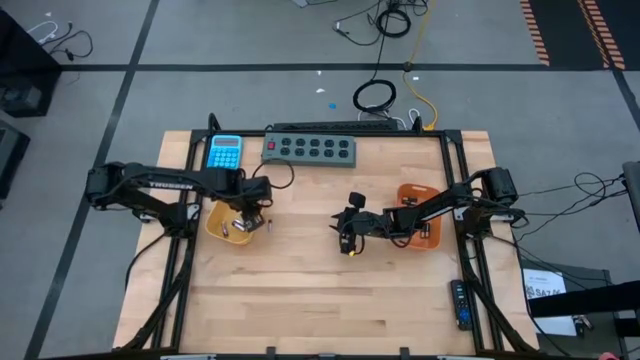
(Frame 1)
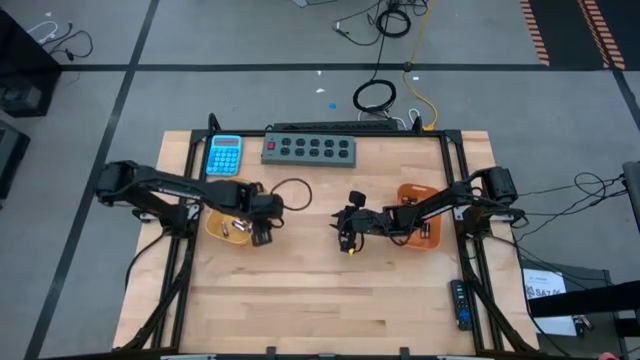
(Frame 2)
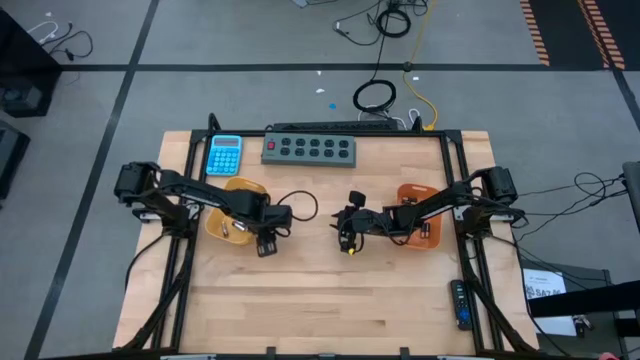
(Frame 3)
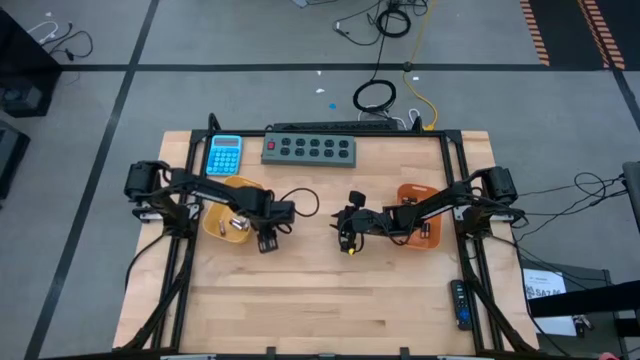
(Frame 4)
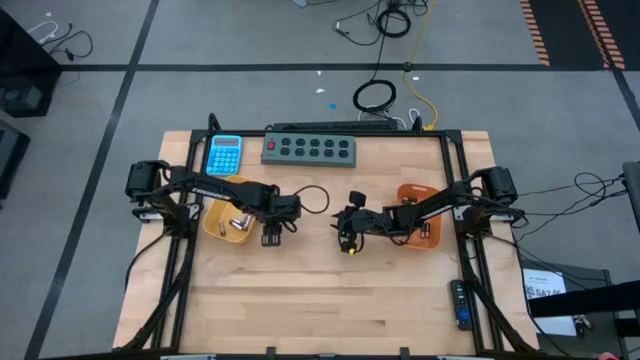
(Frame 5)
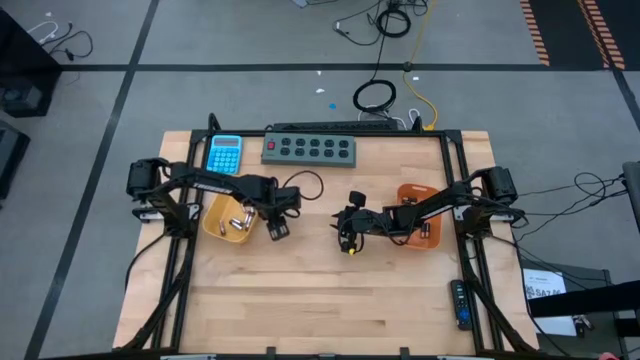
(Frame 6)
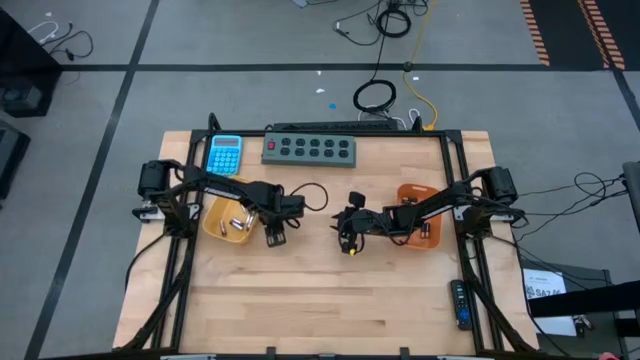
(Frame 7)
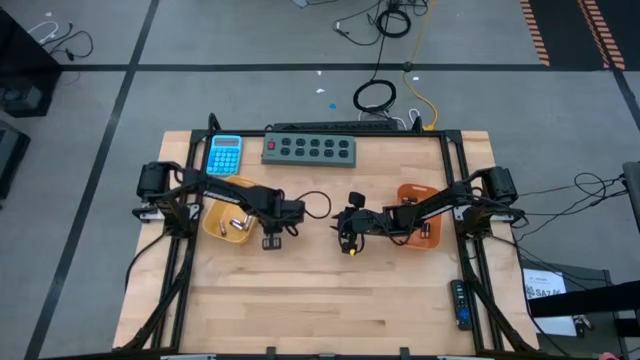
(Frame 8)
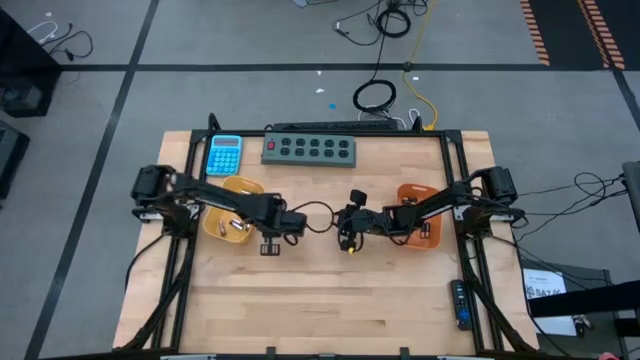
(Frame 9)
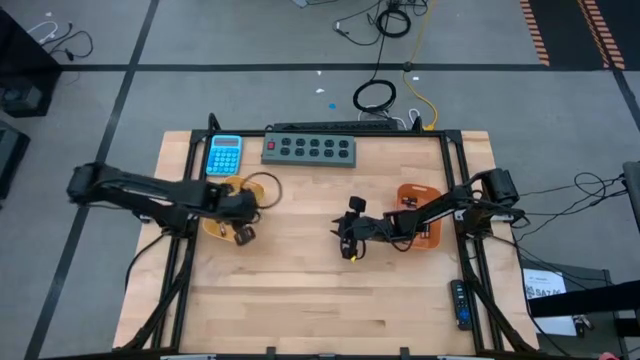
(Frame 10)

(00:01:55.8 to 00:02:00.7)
Task: Sort batteries
Put the white battery into the yellow bin

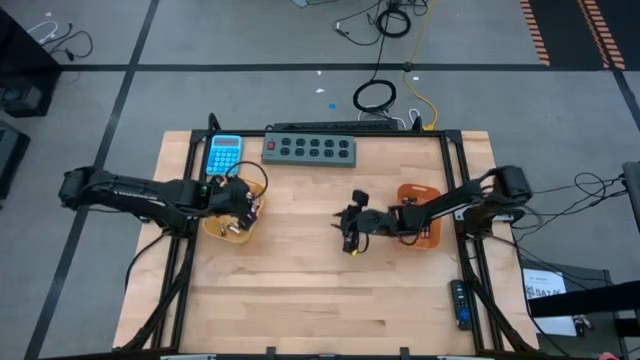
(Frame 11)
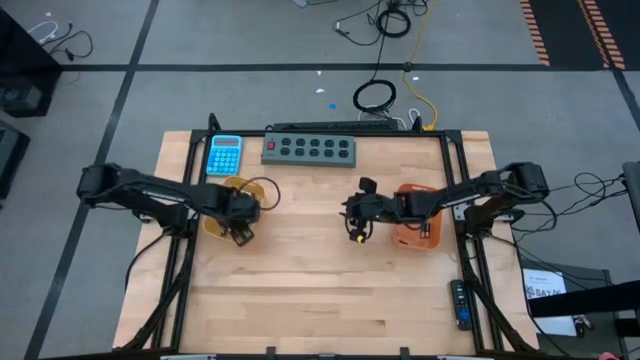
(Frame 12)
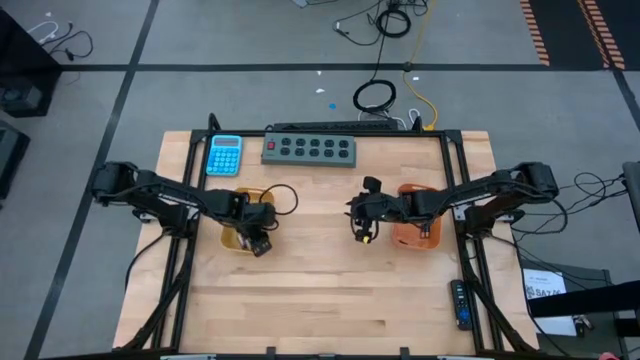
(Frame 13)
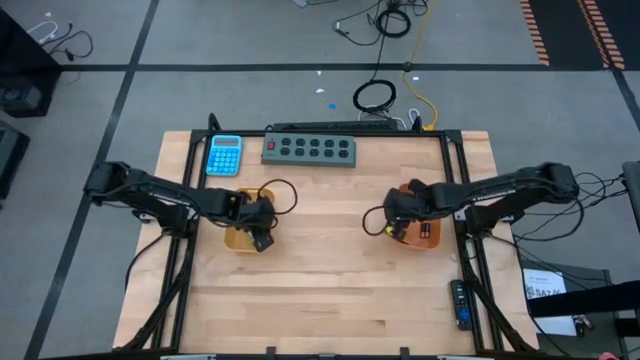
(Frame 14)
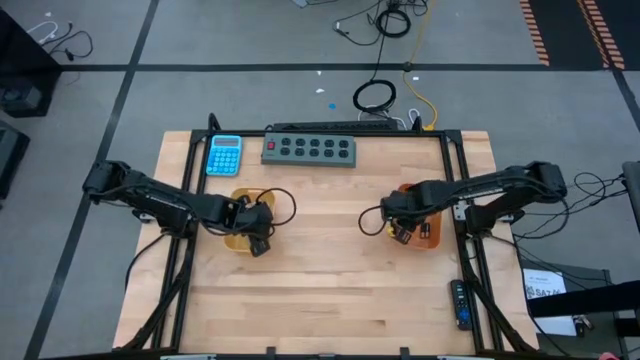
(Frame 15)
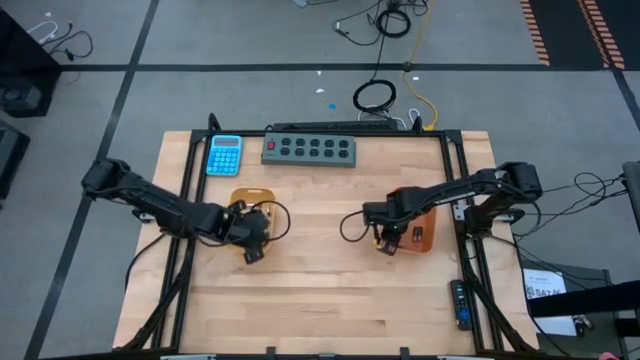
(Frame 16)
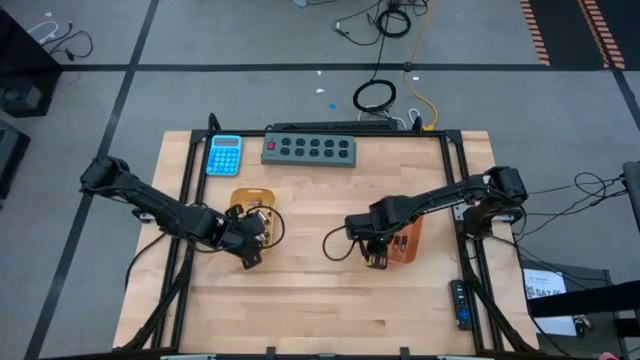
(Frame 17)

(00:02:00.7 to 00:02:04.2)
Adjust the yellow and orange bins to the center

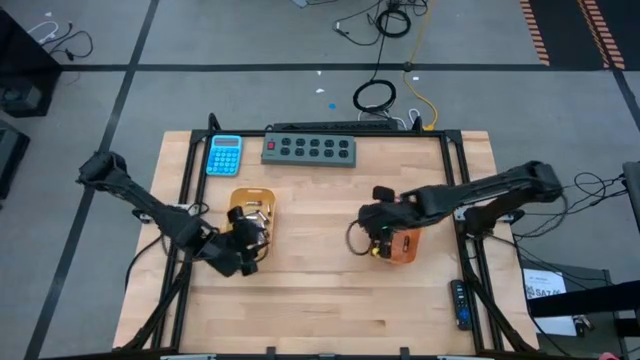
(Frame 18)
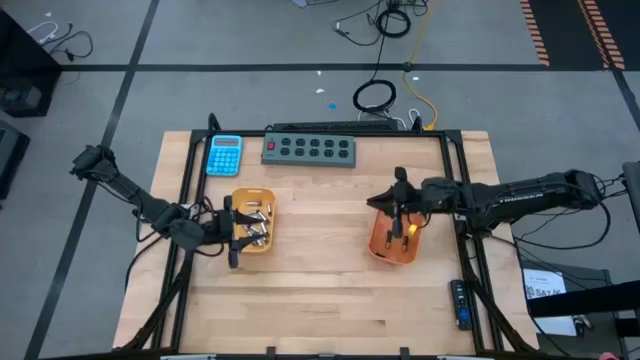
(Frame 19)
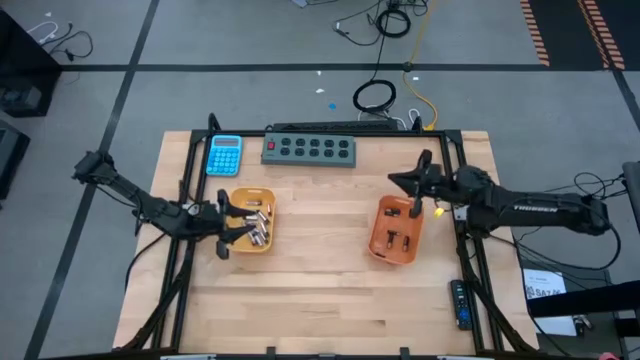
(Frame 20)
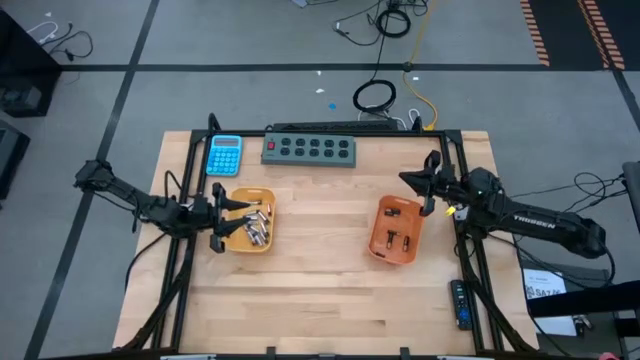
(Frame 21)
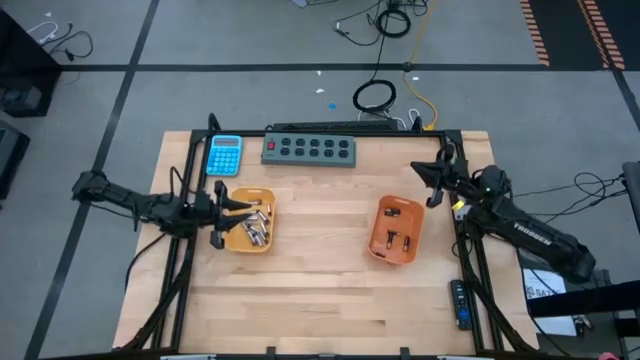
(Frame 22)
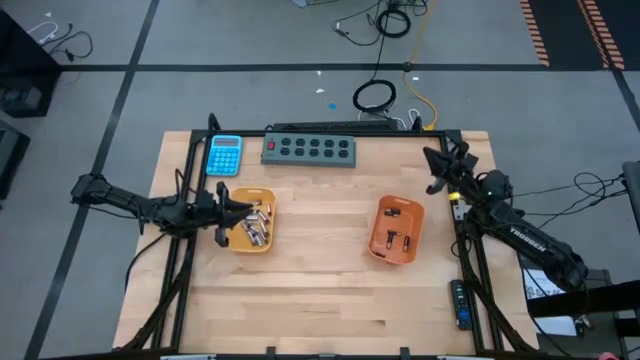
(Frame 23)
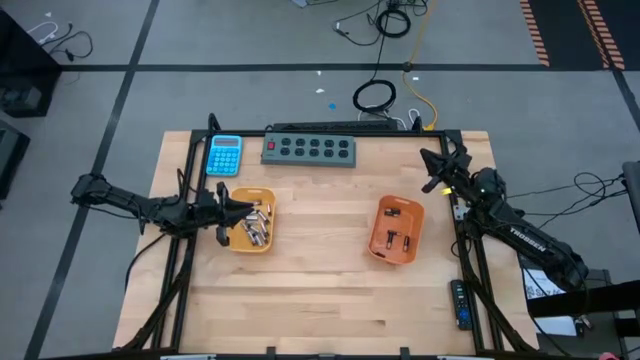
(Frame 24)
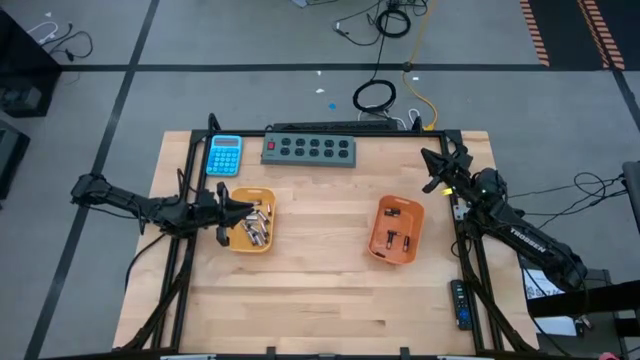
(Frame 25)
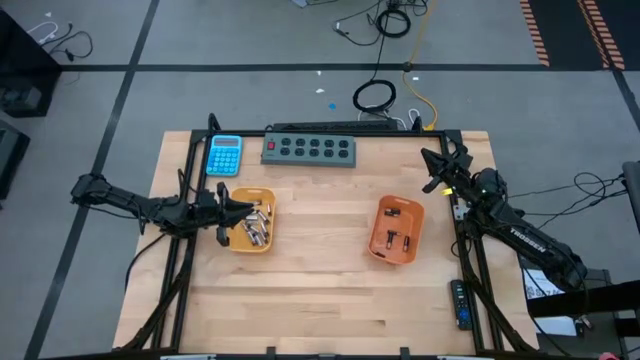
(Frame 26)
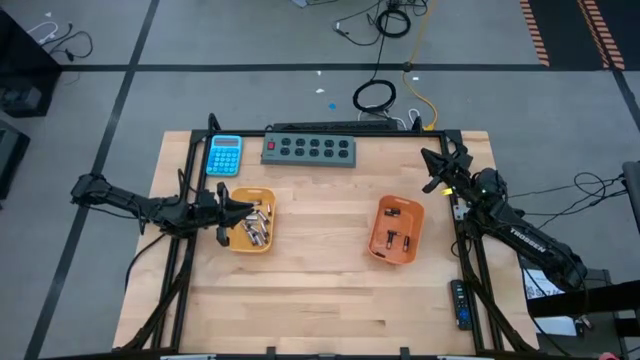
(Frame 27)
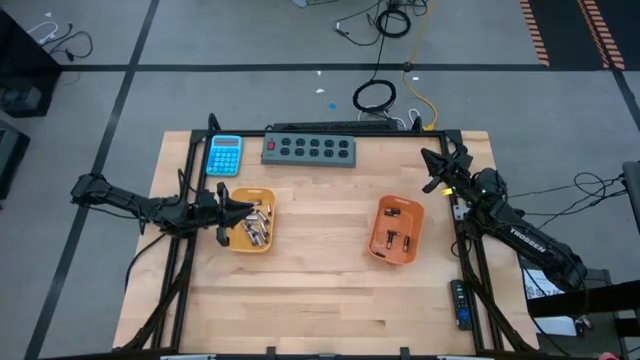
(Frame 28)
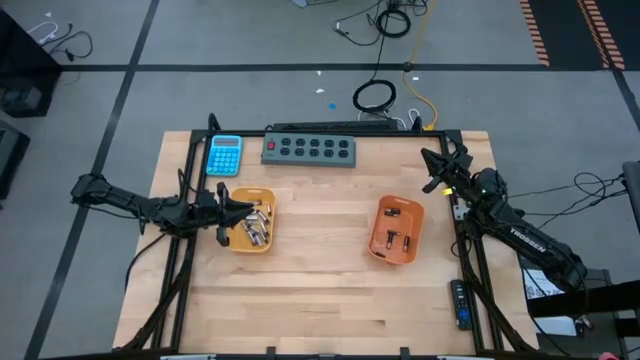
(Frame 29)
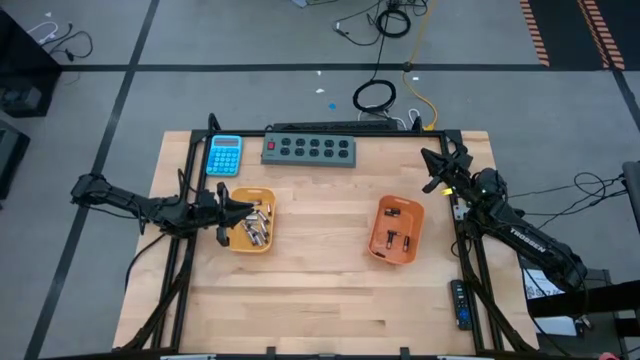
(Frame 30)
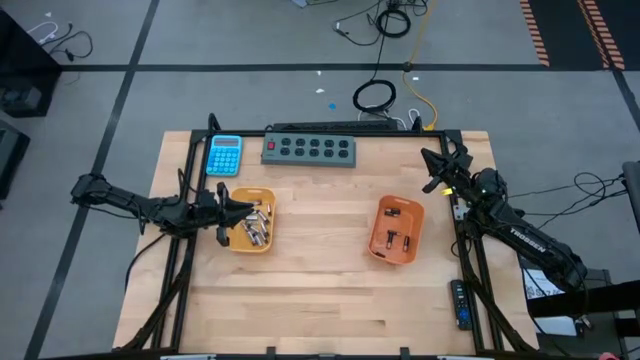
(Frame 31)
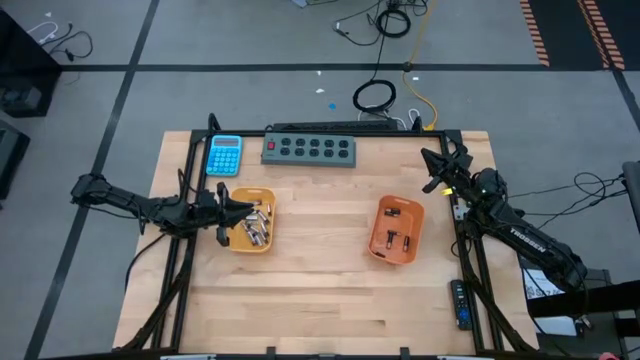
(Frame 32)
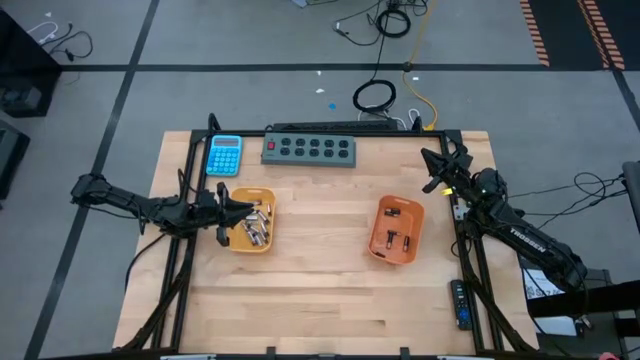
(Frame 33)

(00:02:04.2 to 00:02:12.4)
Return to Home Position

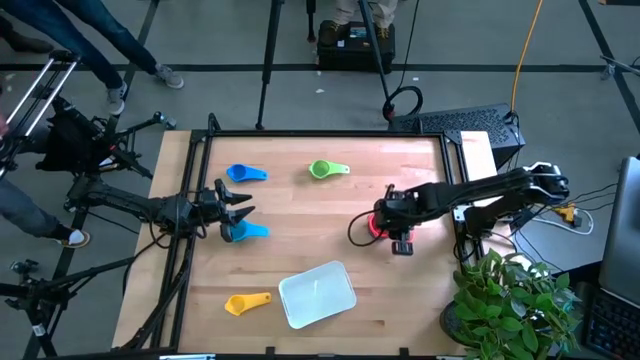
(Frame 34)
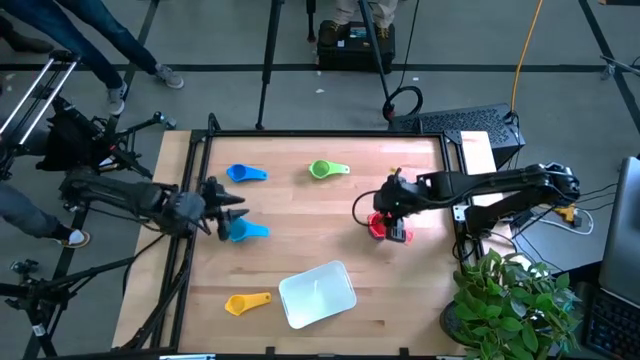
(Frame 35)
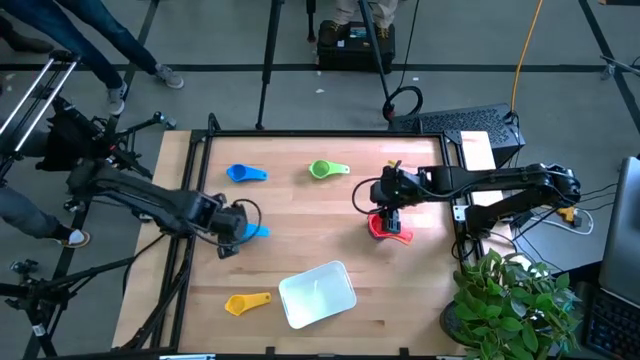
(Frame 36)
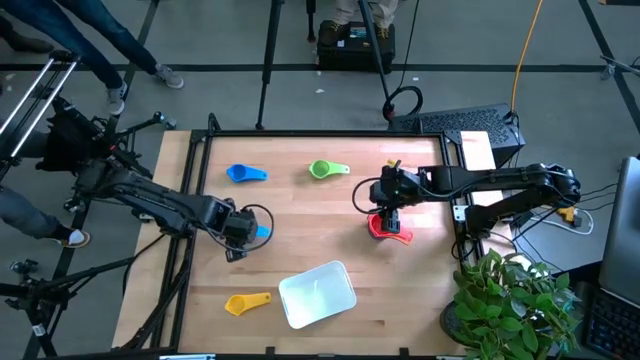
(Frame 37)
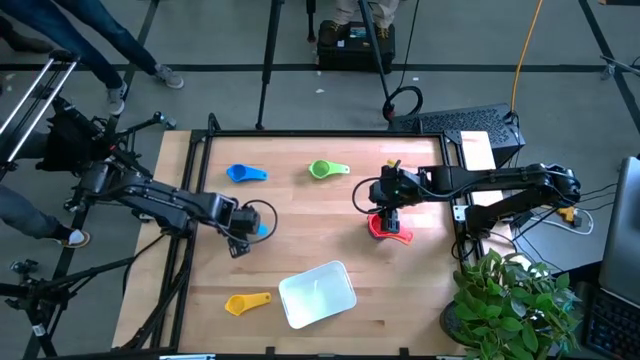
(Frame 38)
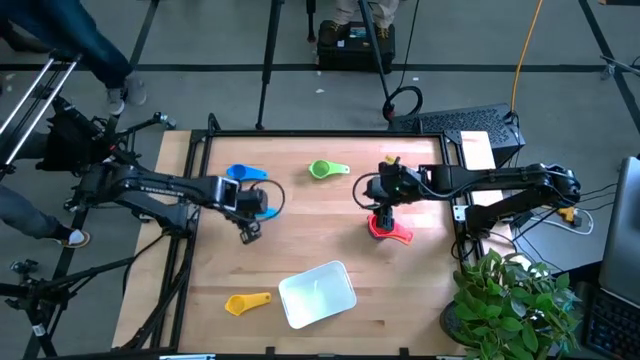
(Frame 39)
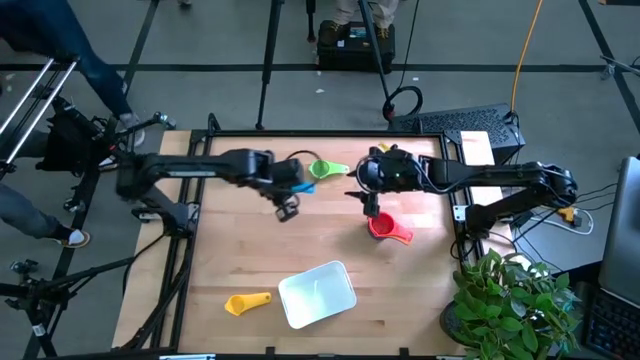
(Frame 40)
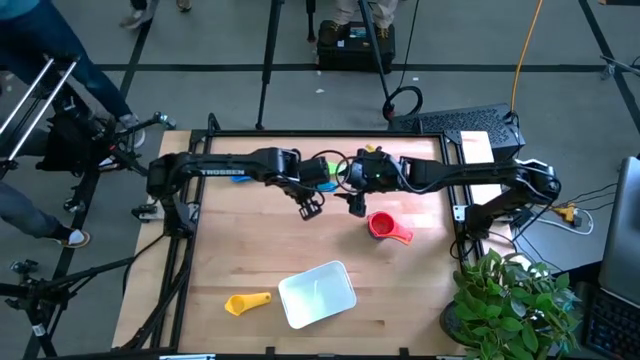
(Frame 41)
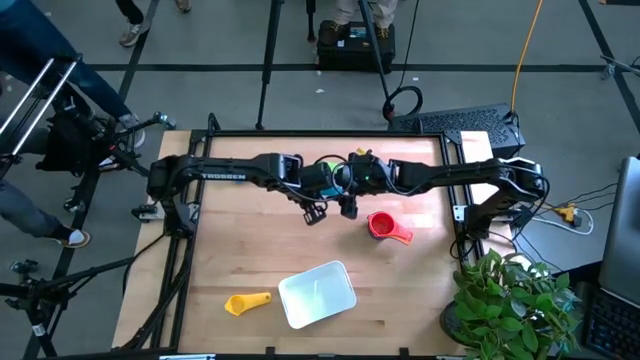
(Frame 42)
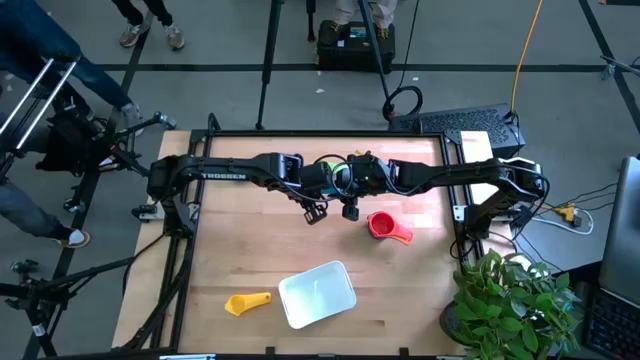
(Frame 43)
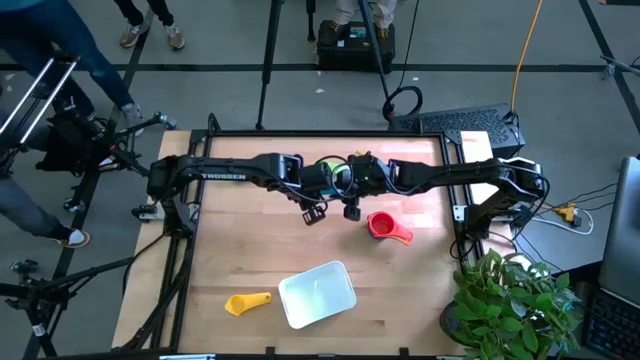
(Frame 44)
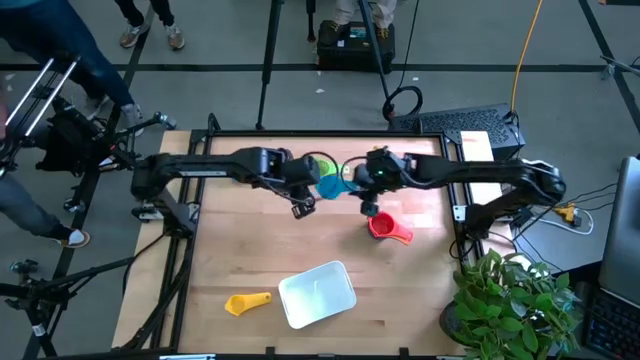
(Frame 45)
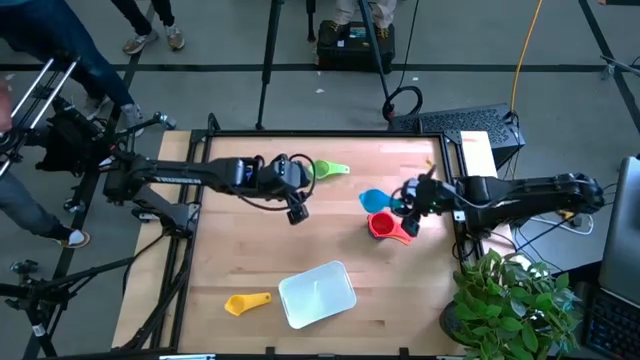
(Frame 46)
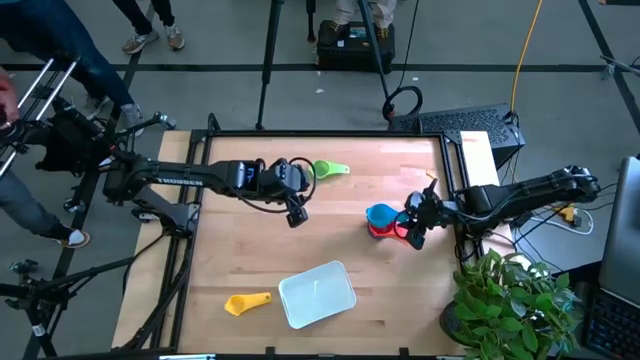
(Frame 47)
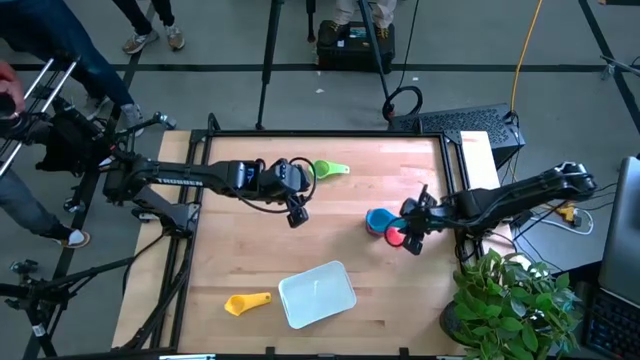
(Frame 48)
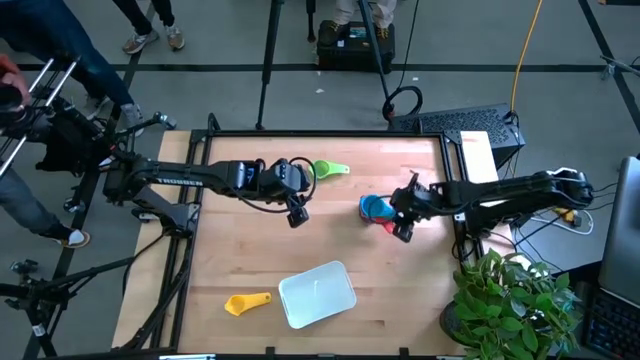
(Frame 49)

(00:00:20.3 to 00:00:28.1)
Task: Nest measuring cups in basket
Stack the light blue measuring cup on the red measuring cup
